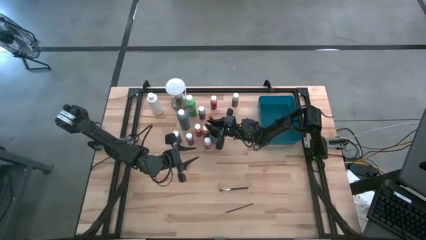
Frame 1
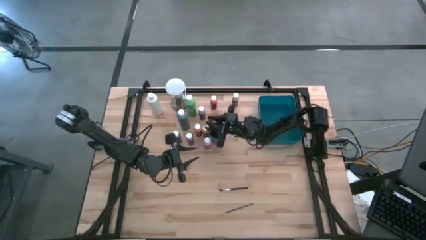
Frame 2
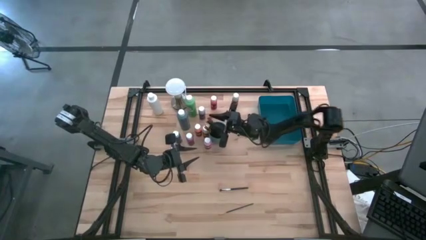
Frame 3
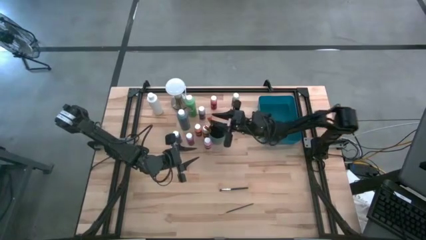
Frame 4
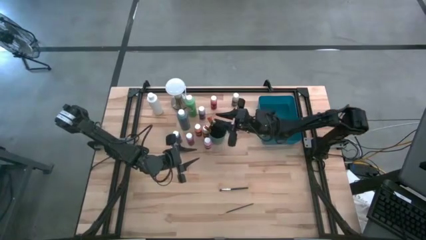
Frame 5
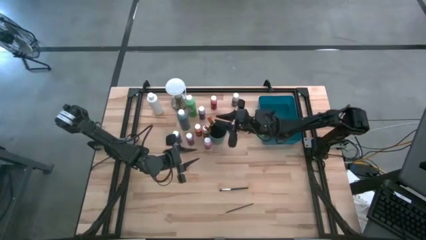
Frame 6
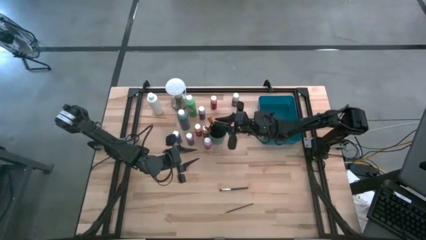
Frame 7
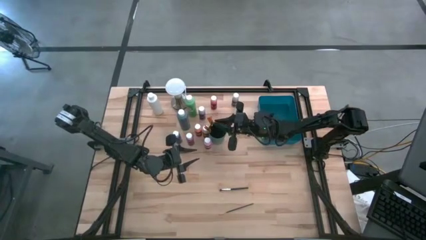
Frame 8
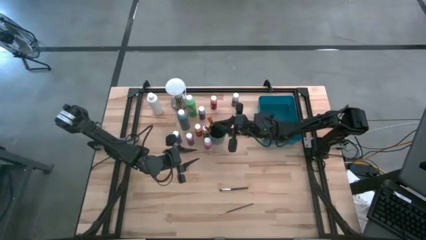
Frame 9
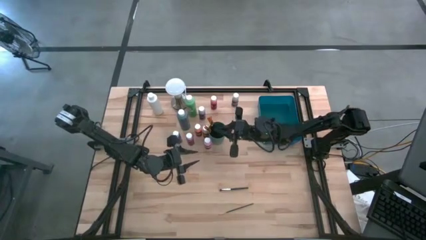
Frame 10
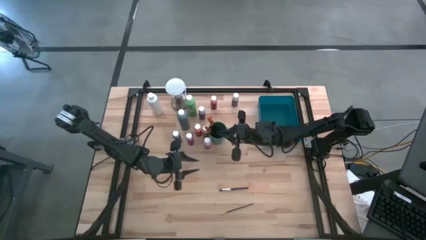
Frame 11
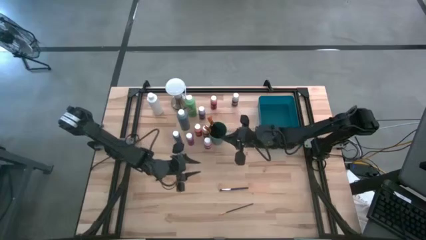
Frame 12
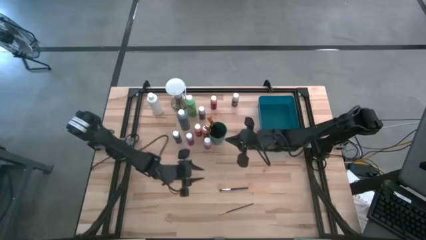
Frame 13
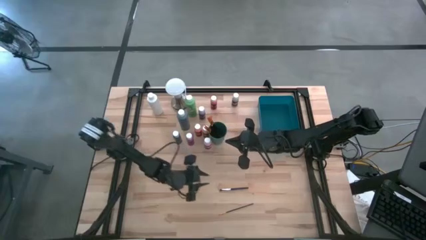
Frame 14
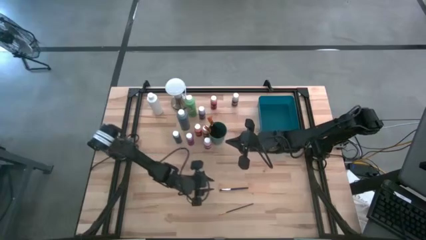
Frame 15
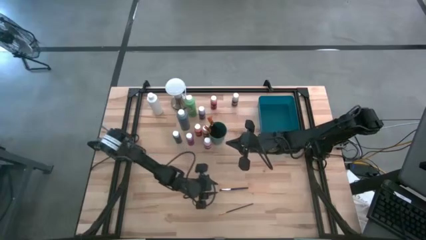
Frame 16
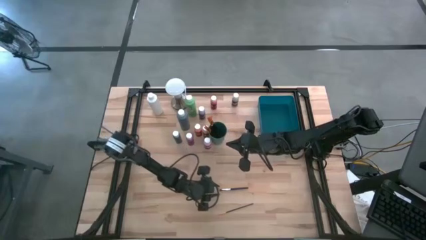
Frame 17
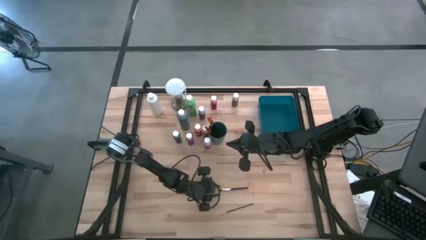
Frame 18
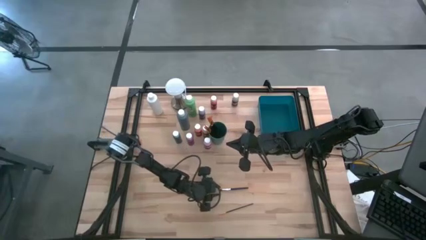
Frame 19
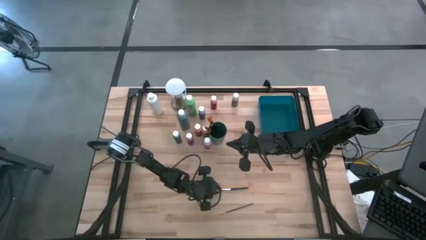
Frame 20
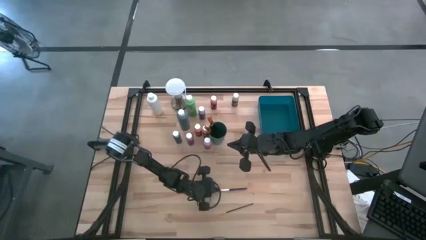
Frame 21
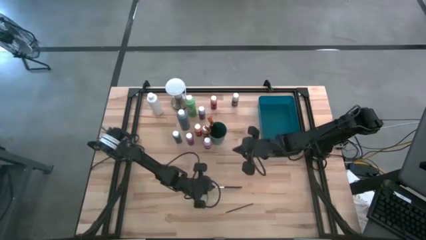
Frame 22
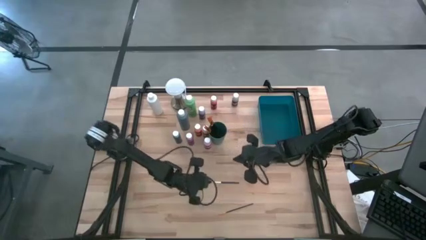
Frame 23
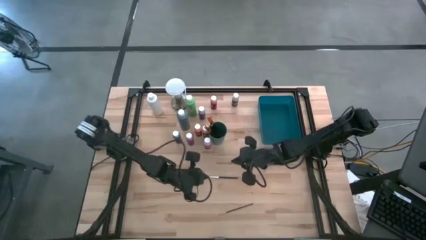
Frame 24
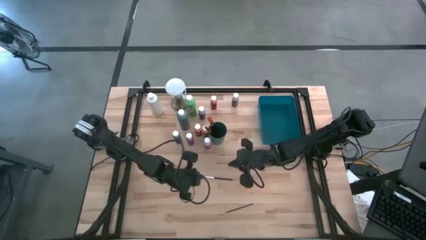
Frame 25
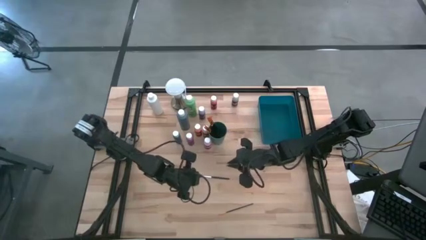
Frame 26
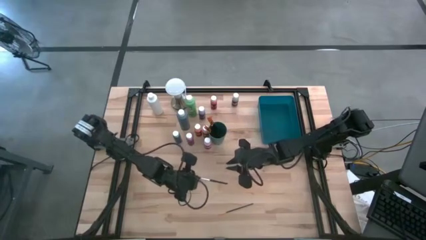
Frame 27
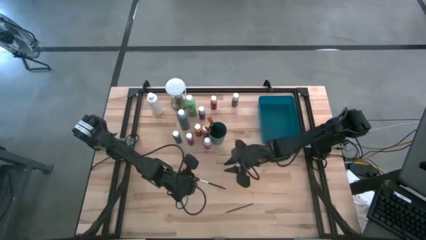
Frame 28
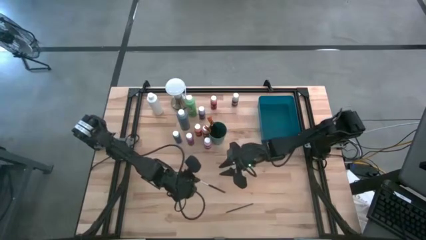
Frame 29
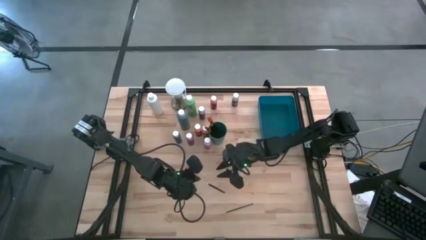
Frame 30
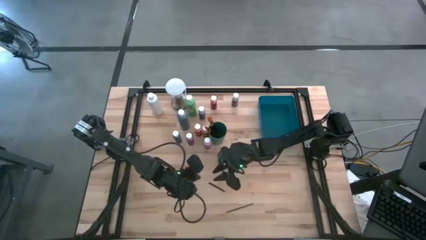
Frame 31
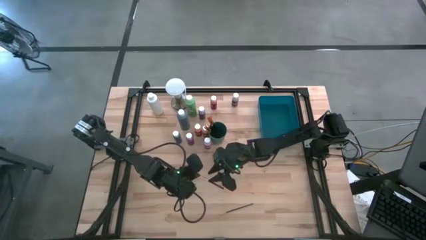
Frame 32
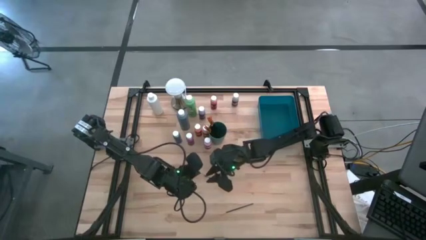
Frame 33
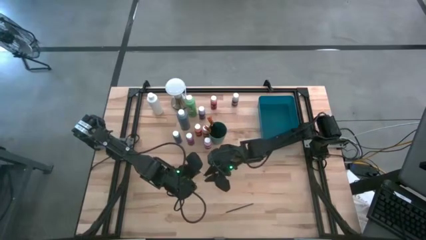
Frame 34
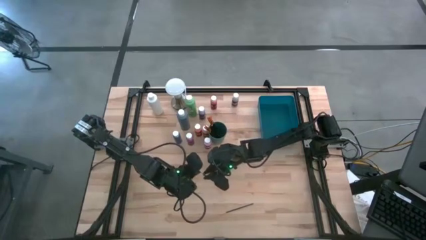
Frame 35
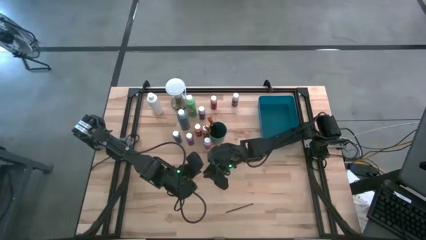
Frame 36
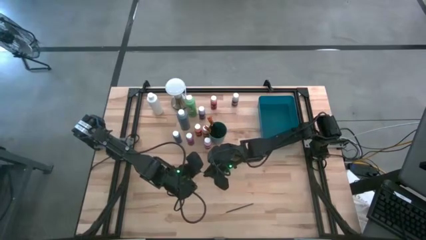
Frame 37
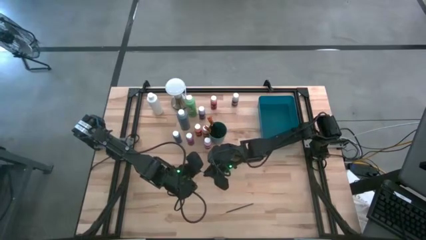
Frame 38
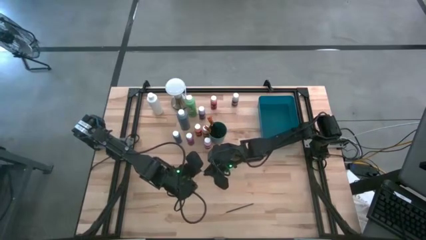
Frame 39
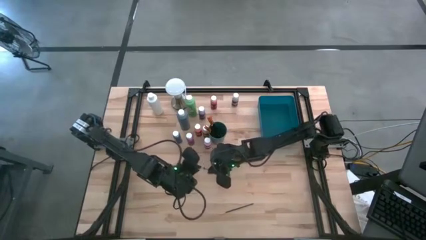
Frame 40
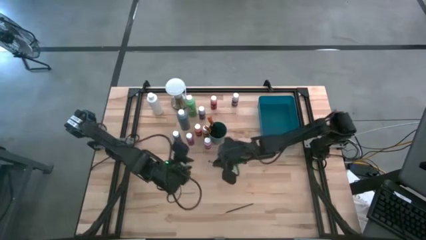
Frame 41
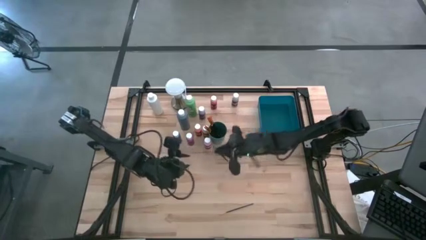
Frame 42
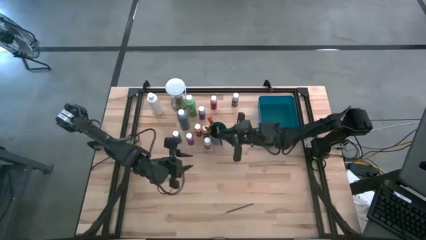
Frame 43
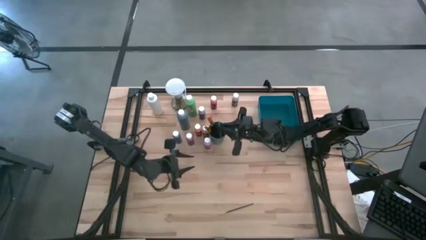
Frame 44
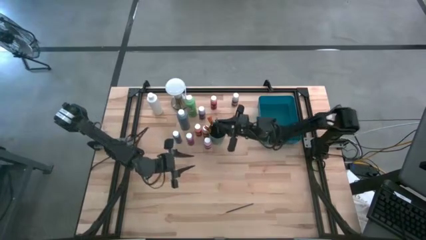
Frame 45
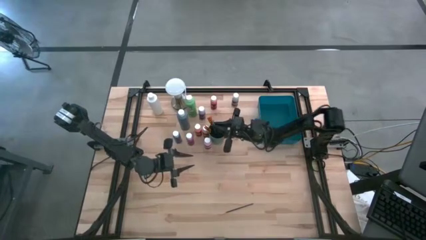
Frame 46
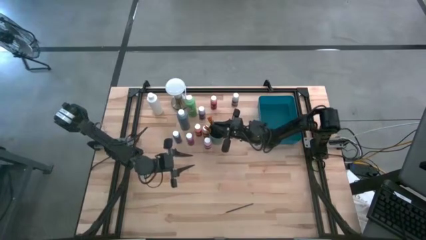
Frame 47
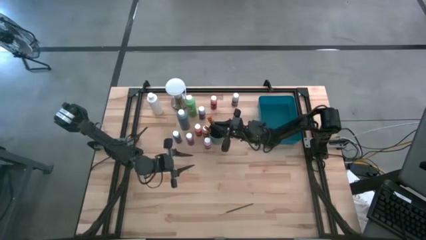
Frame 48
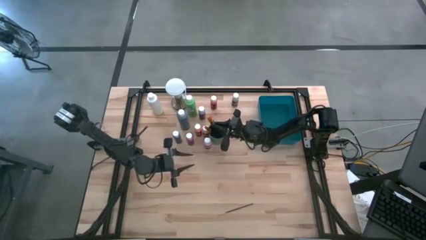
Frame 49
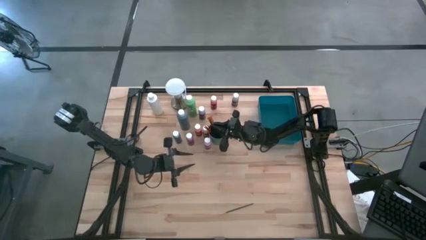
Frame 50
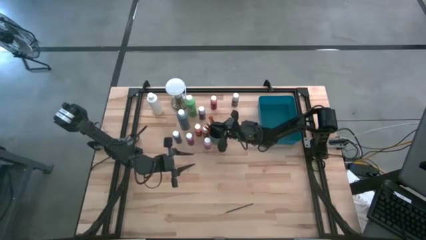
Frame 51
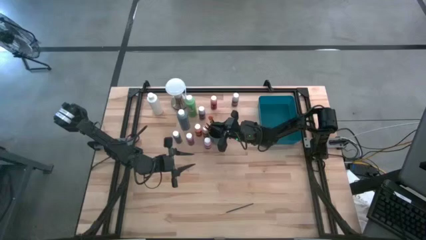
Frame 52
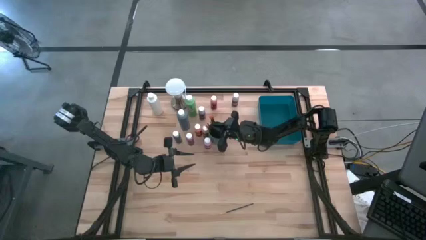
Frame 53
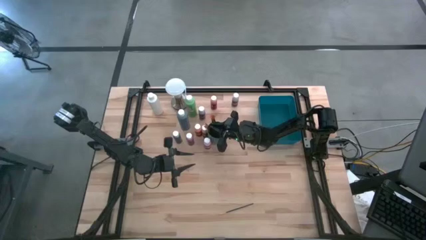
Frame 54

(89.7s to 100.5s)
Task: Pick & Place Paint Supplies
Put the silver paint brush into the green cup

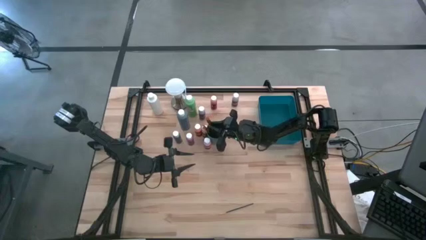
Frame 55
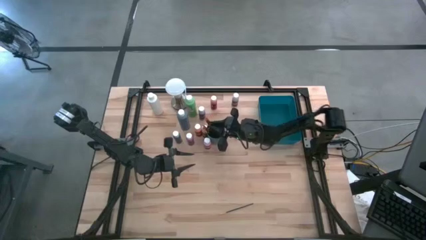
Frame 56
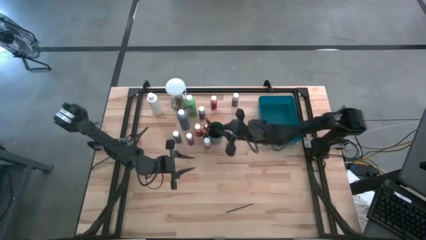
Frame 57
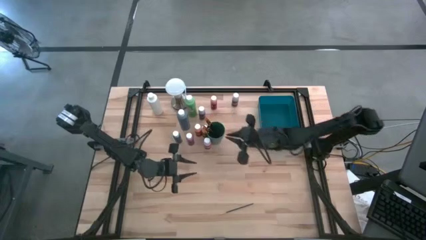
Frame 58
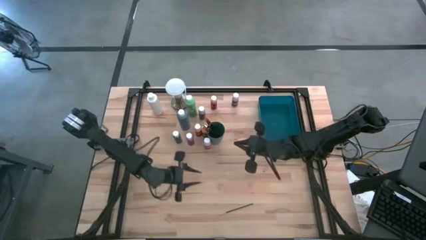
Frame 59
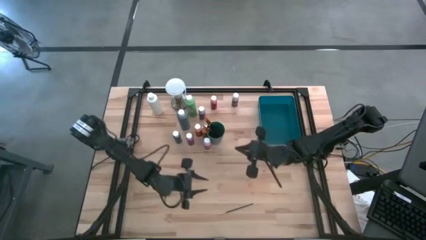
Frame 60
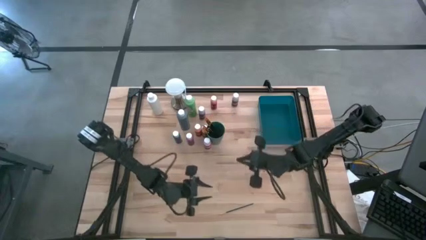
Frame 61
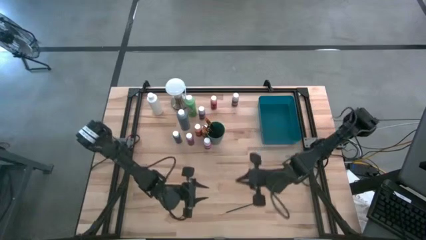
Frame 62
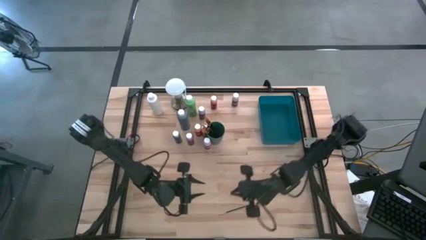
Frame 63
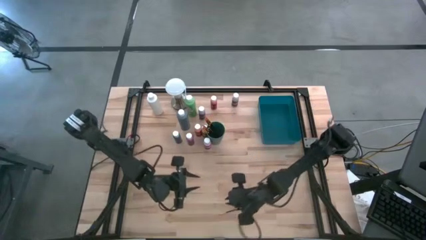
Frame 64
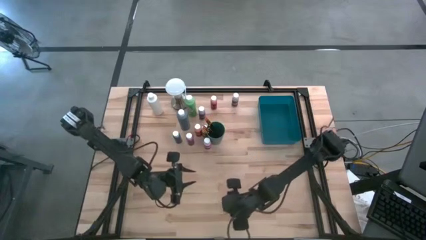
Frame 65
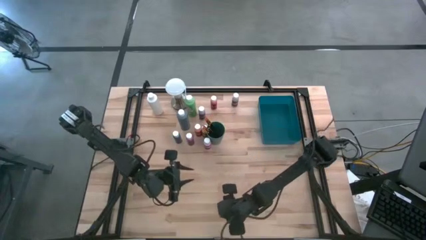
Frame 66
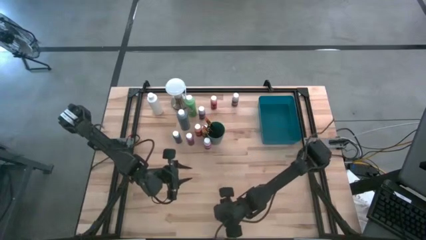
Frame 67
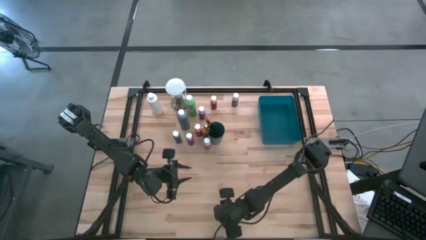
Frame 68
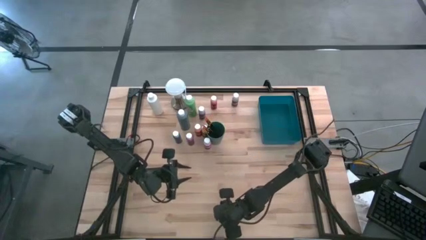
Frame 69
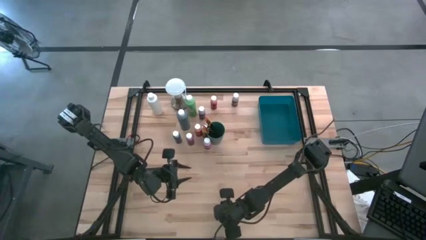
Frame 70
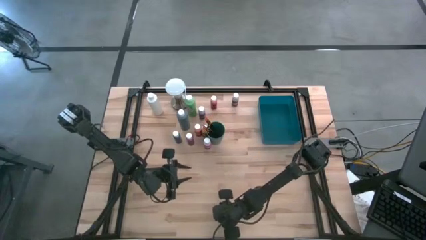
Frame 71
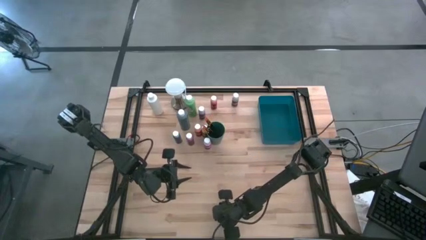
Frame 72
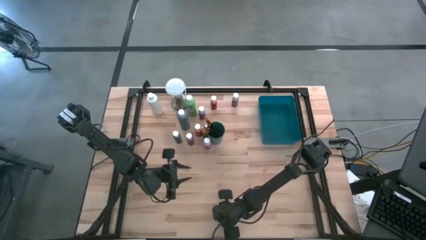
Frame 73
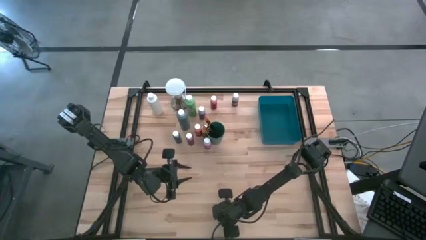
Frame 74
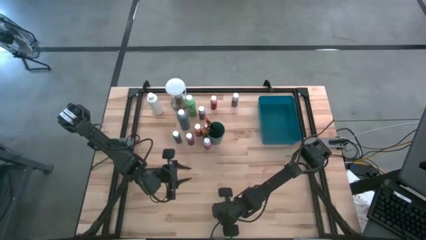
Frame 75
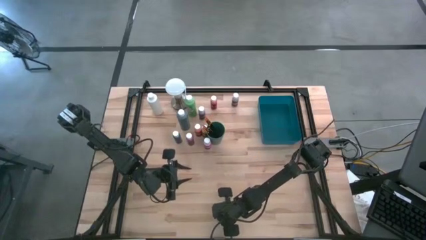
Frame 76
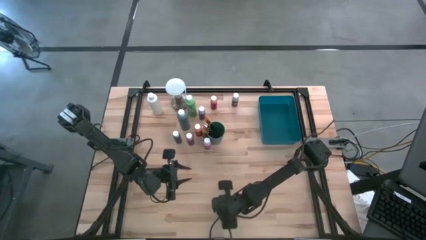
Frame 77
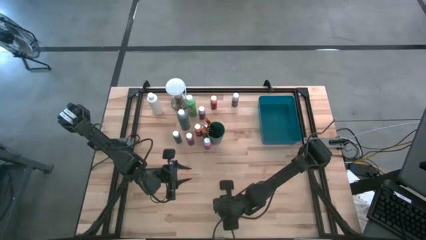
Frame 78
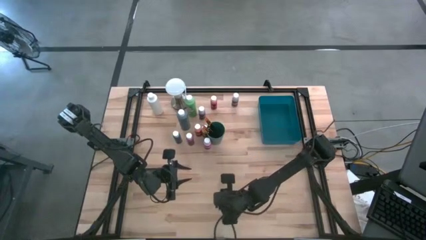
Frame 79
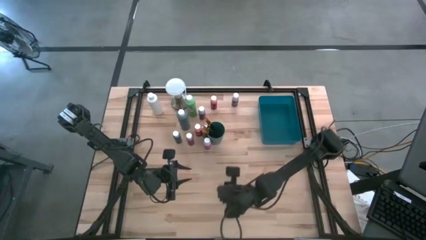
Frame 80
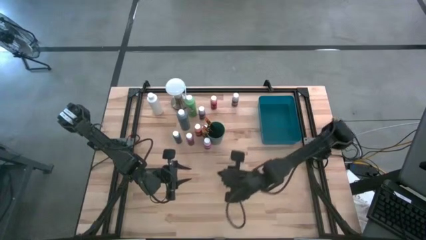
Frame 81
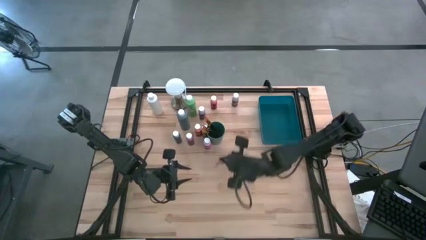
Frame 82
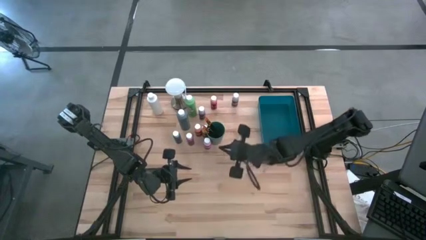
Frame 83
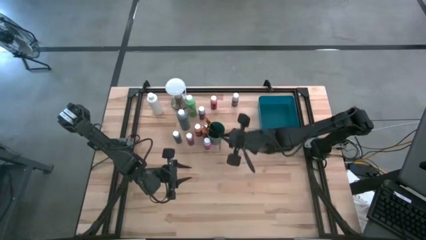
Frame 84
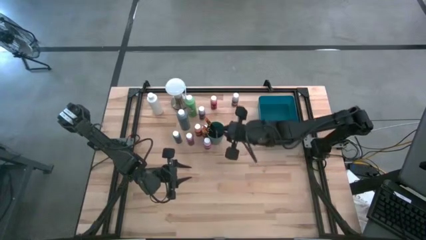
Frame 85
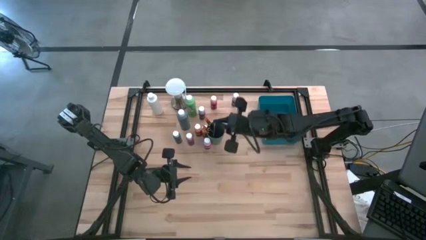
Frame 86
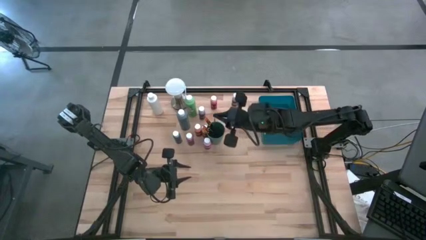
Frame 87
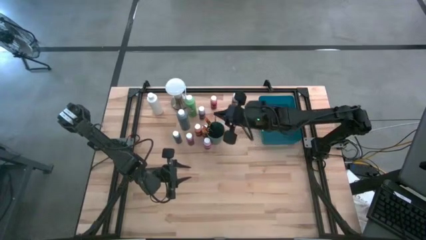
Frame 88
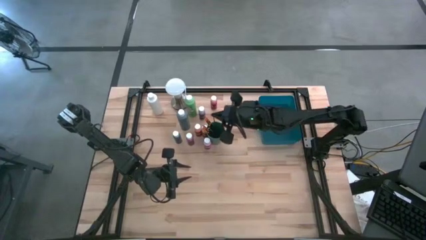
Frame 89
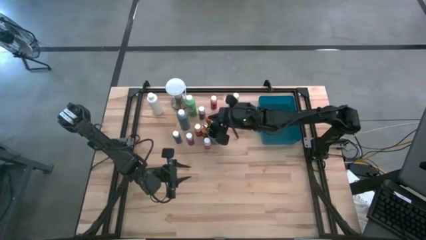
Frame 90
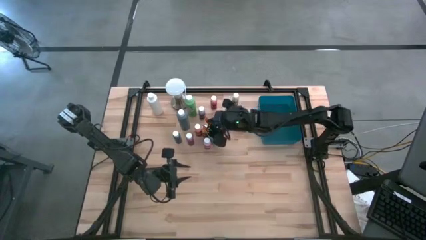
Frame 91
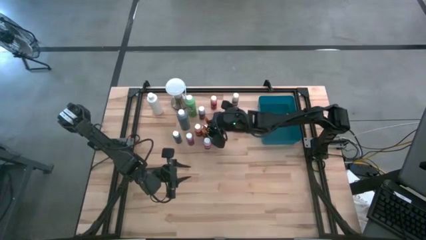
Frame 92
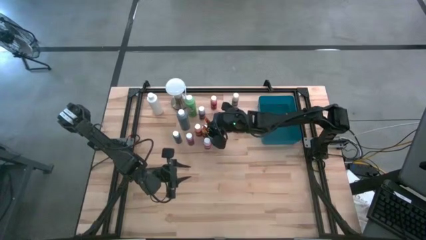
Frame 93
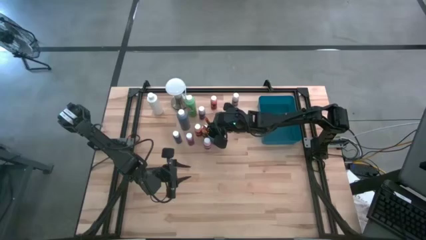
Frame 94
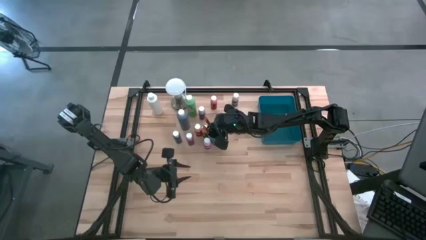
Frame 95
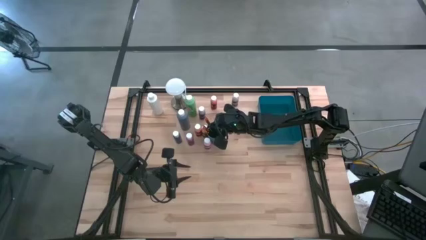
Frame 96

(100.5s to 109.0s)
Put the gold paint brush into the green cup
